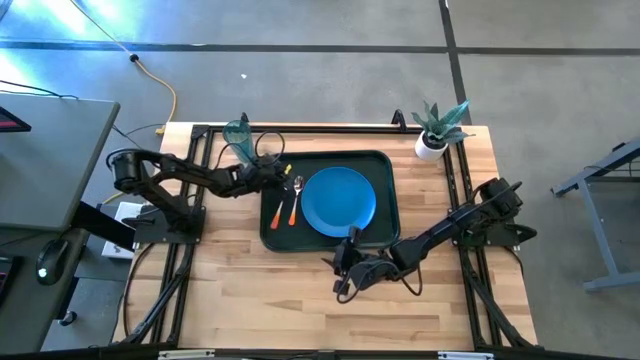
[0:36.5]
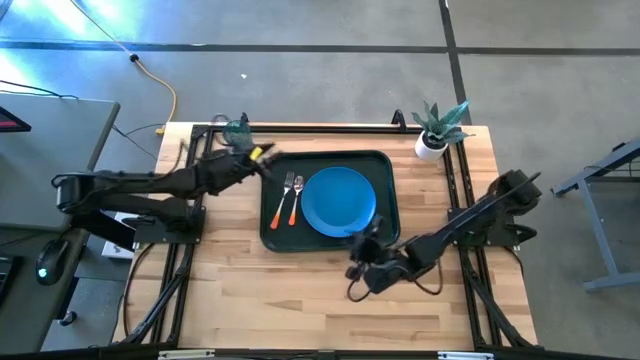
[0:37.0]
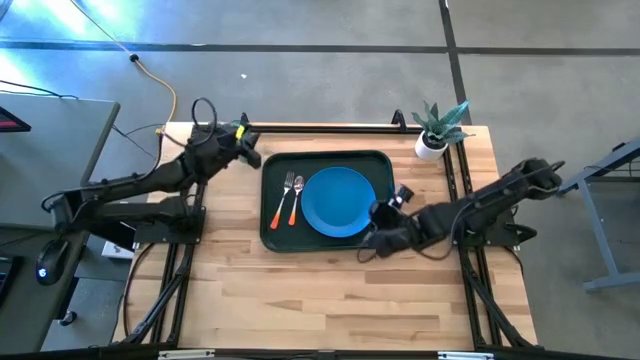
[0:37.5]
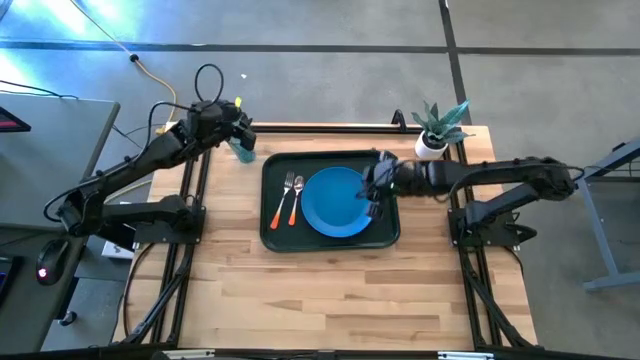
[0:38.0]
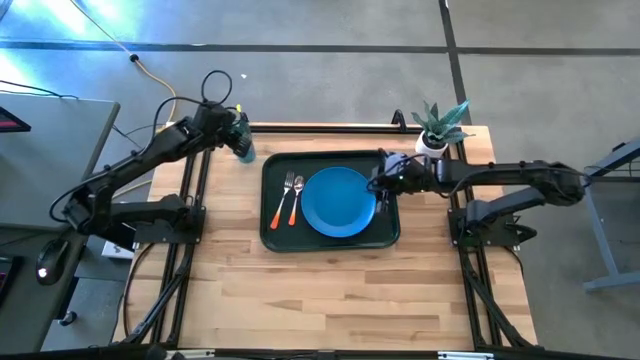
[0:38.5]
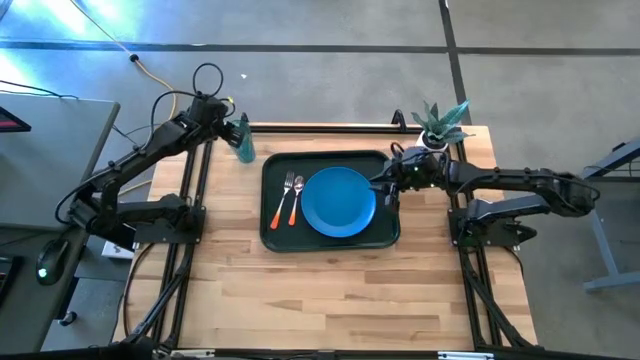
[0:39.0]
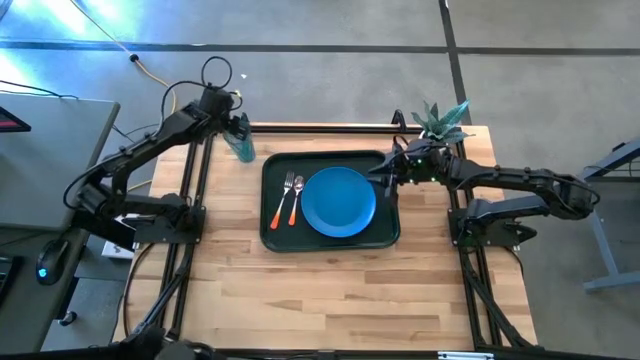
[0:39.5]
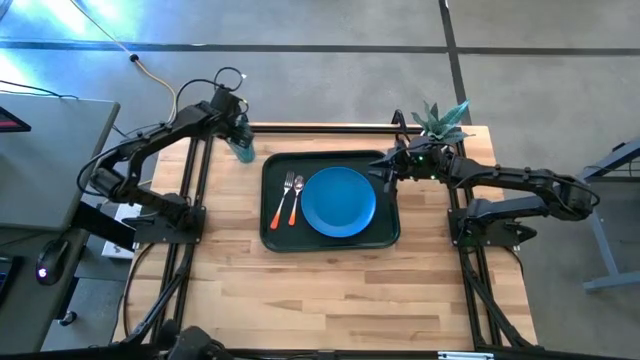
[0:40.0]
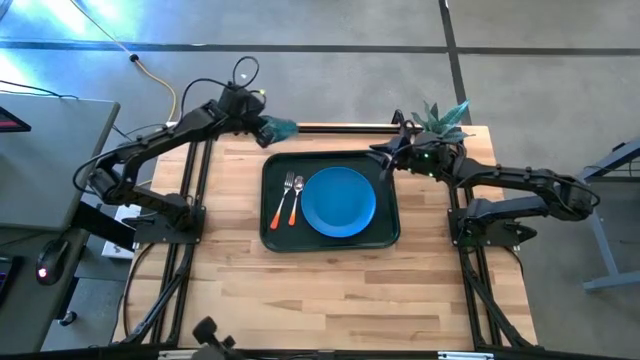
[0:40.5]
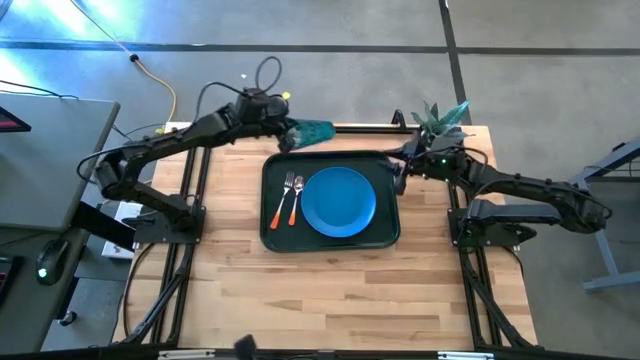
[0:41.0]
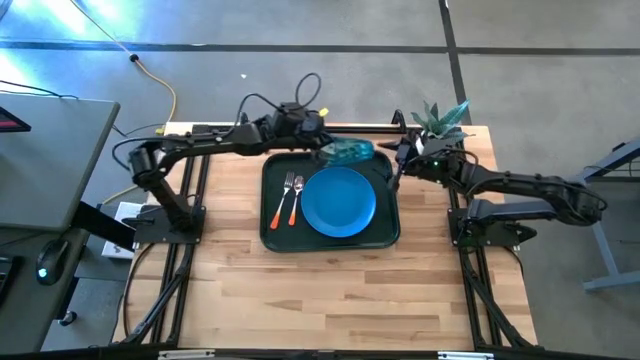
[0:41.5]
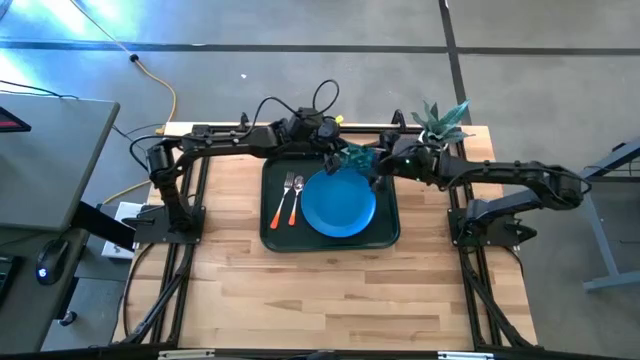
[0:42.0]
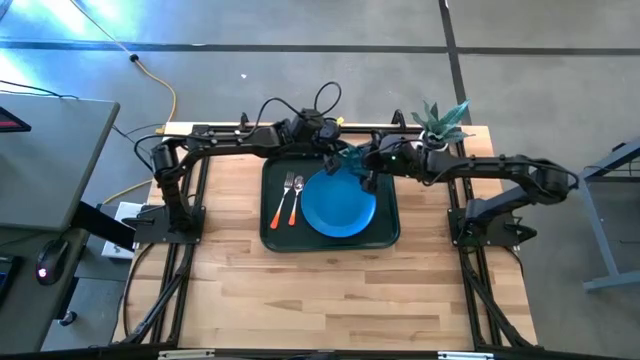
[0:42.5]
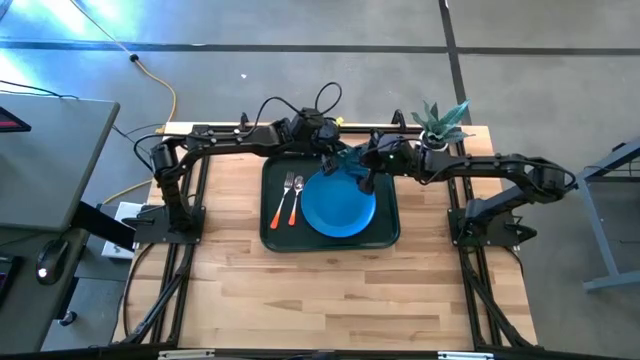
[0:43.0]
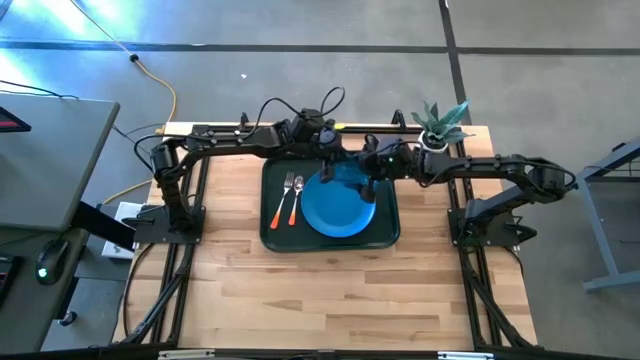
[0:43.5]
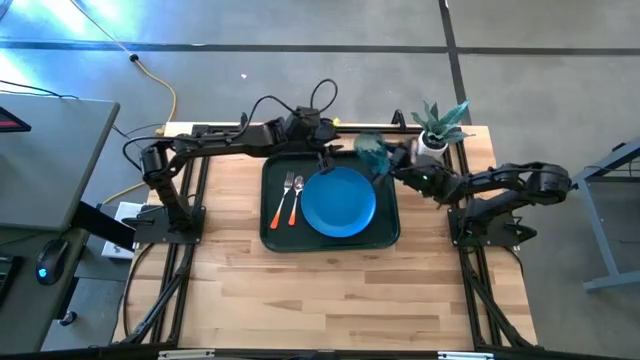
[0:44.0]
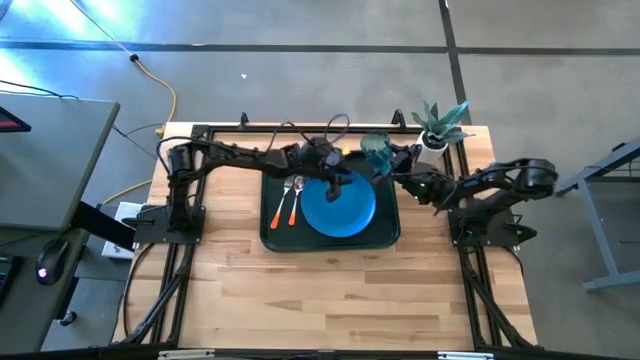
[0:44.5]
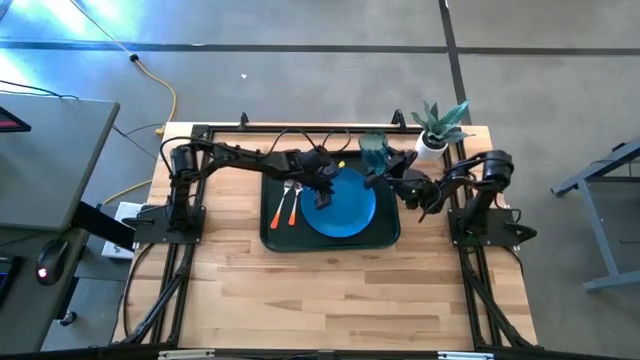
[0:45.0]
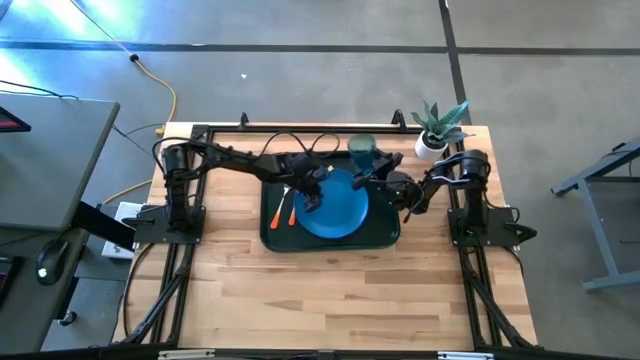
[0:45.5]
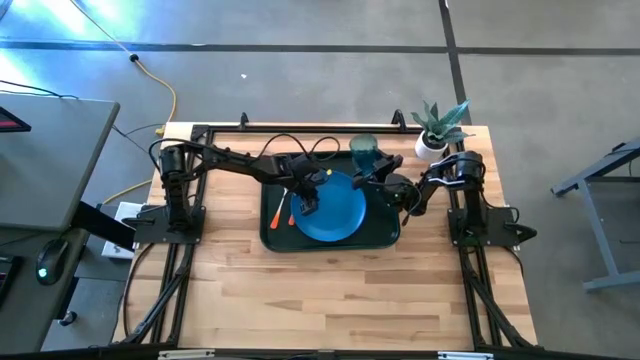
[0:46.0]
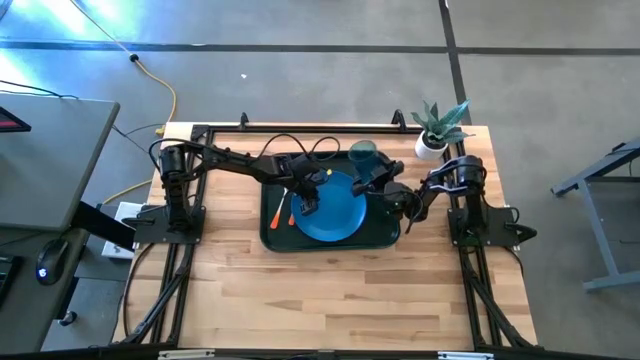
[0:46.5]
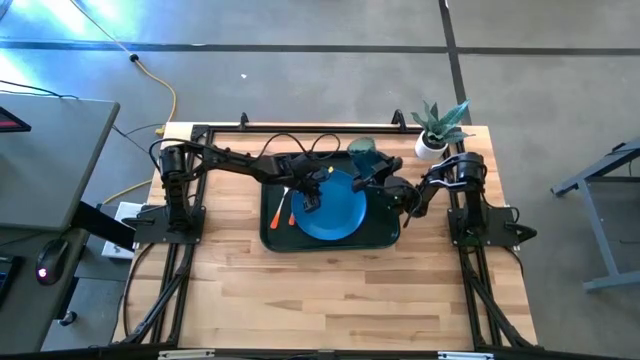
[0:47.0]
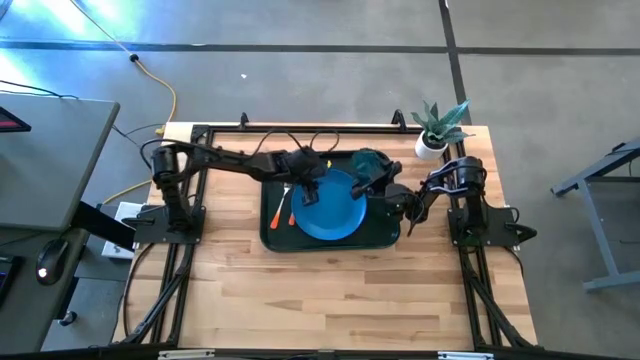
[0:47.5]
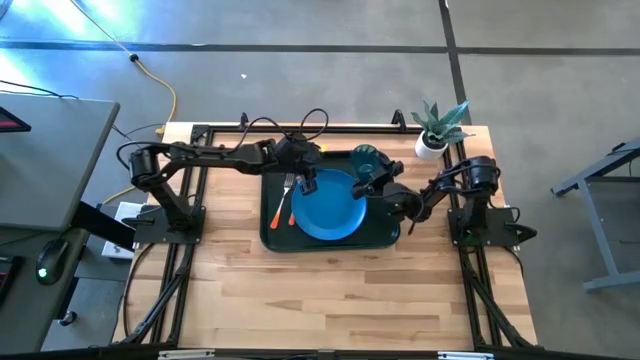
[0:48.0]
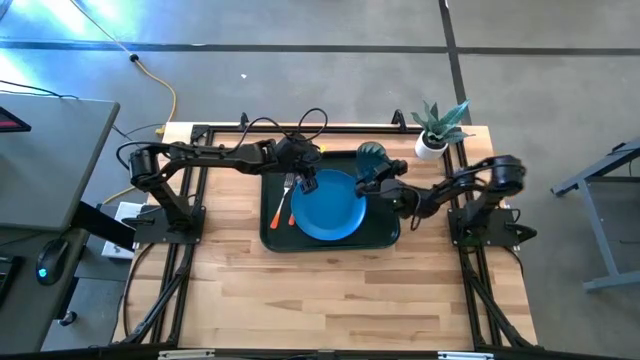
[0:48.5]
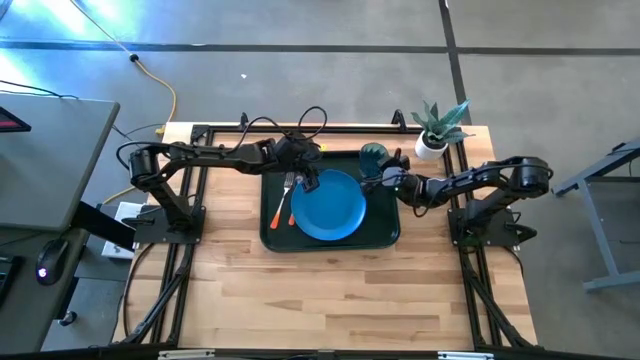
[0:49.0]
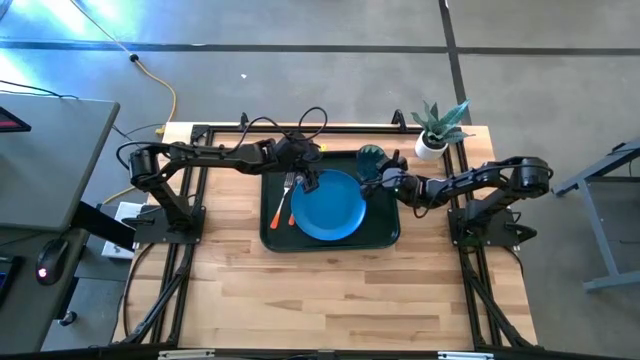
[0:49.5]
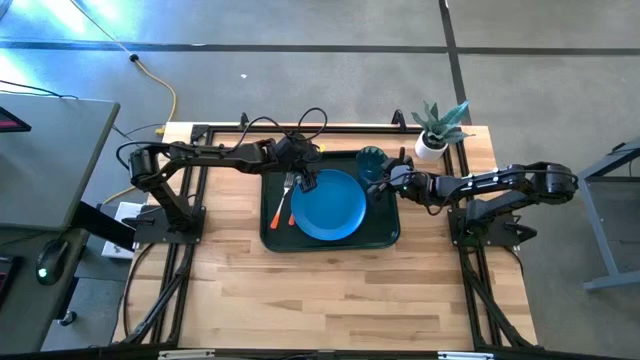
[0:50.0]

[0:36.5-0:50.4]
Task: Pick and place plate/cup/fork/spoon on tray
Put the blue cup on the black tray

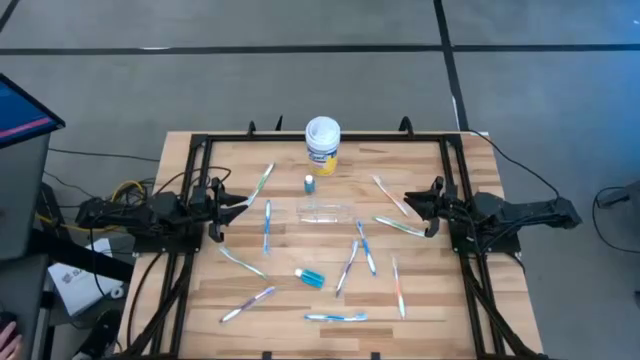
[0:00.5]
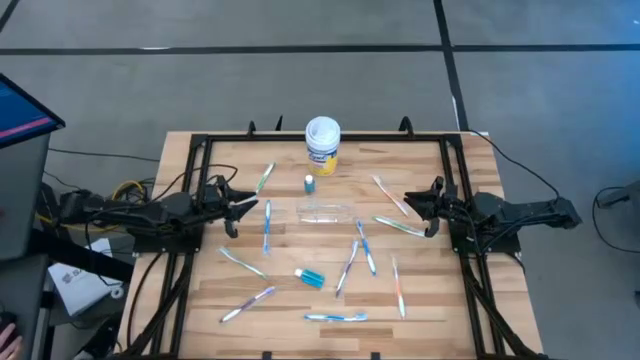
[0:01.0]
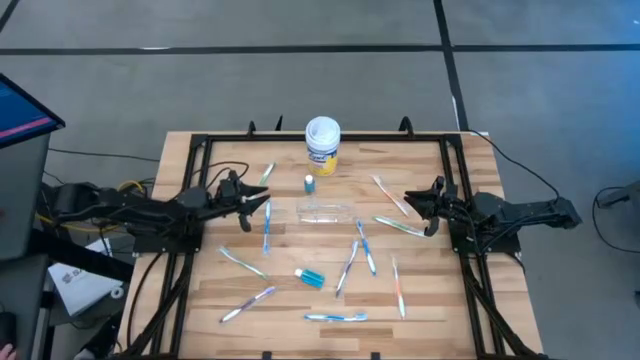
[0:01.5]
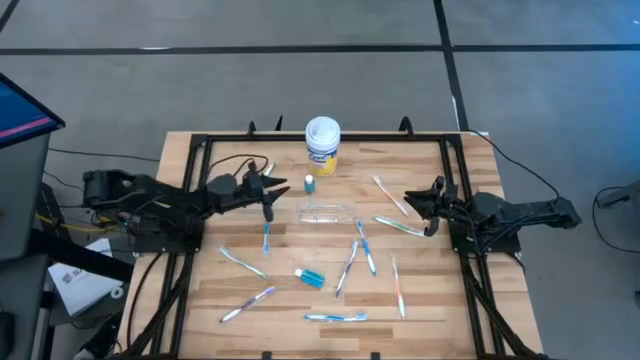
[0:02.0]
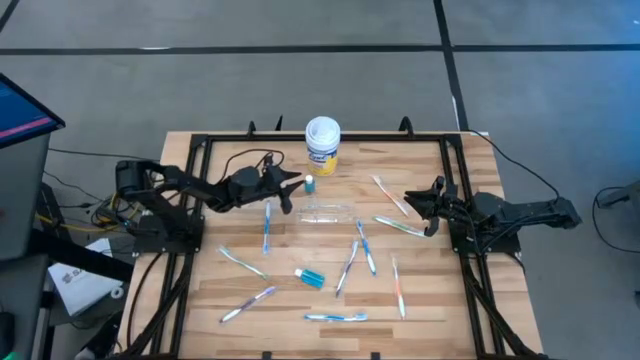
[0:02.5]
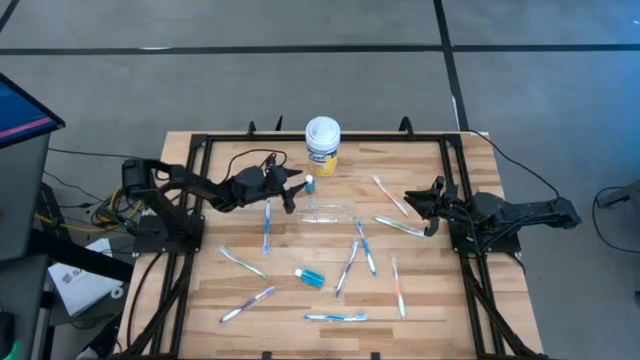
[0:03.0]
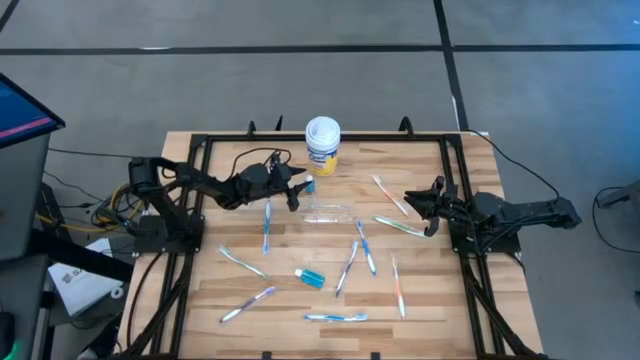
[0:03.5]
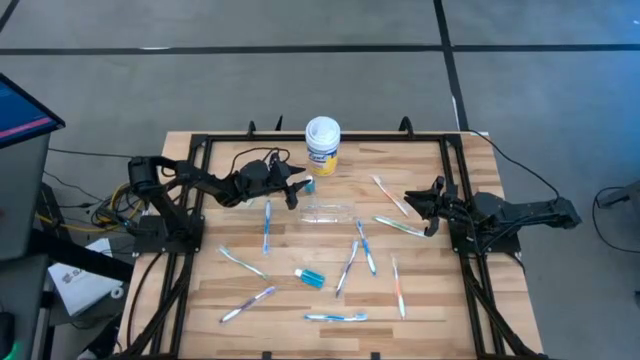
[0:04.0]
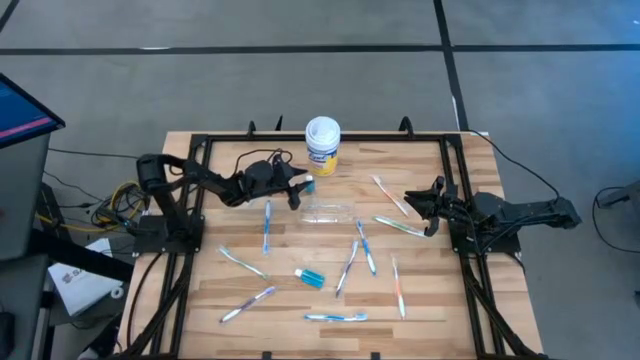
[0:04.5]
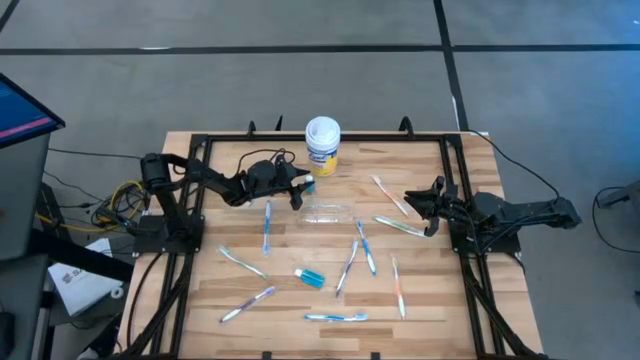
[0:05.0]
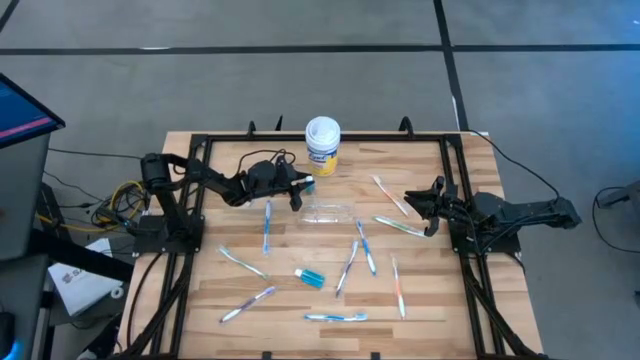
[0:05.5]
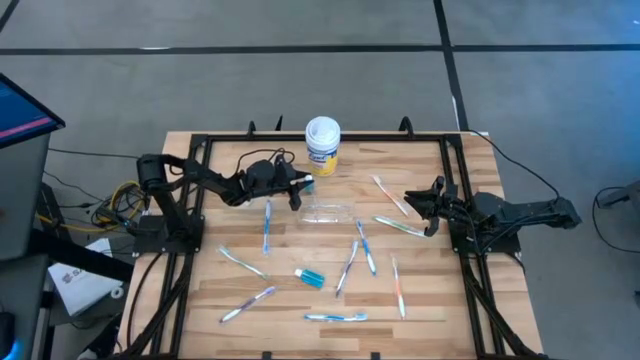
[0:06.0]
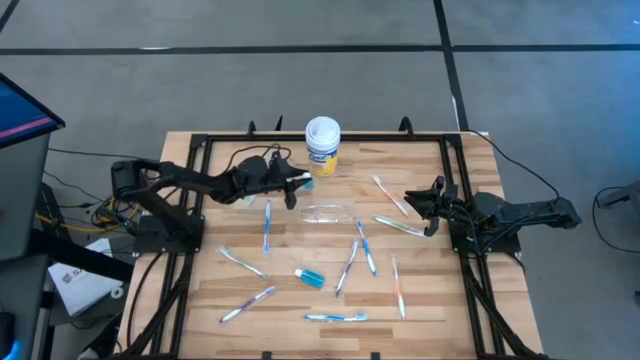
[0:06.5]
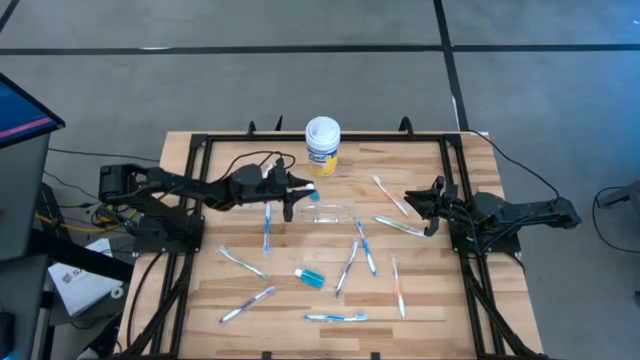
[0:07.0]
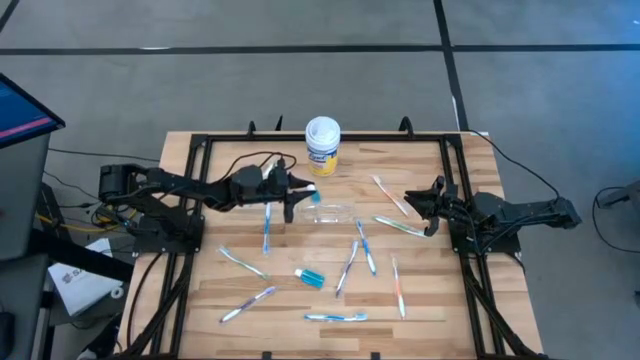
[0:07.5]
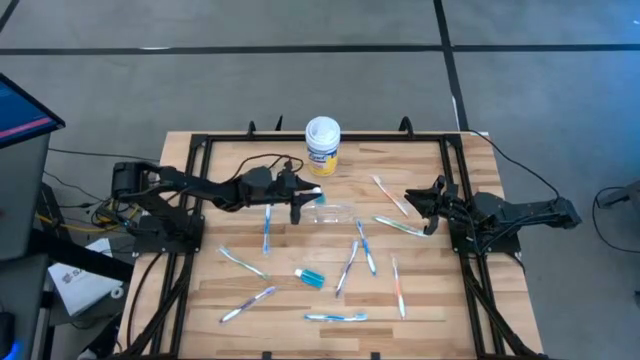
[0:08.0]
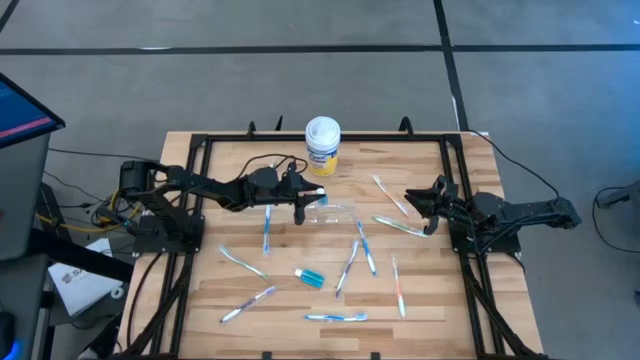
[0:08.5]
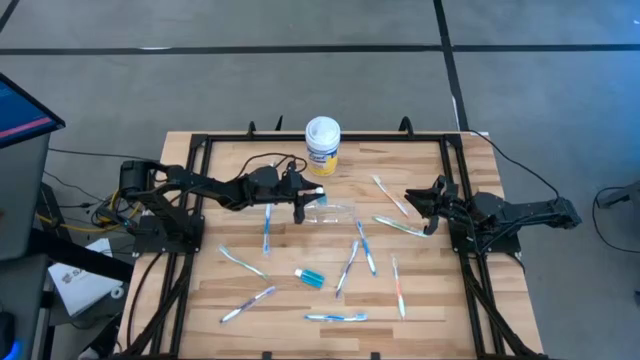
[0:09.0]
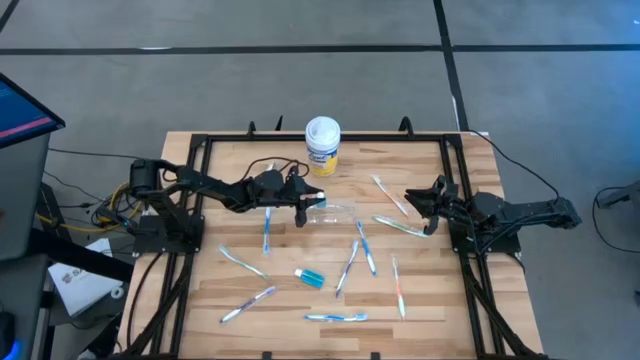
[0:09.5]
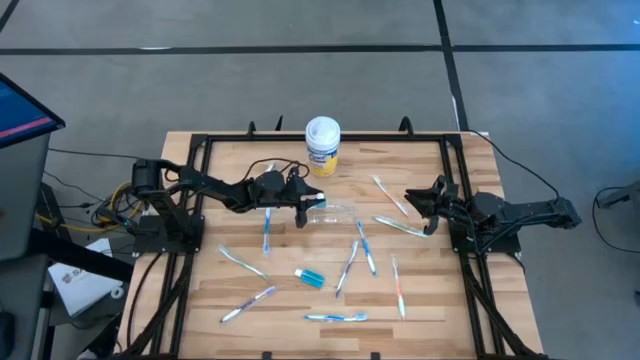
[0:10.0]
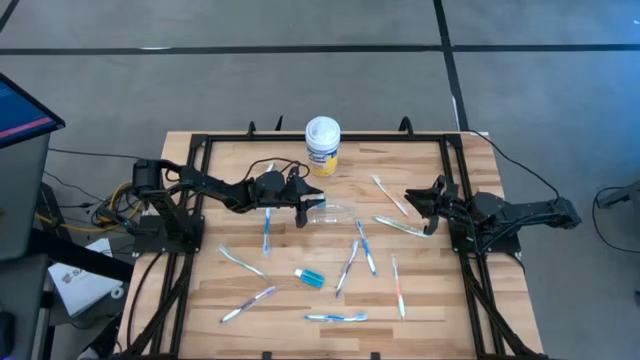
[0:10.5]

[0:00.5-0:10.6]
Task: Pick & Place toothbrushing station
Put the top blue mouthwash into the transparent organizer
